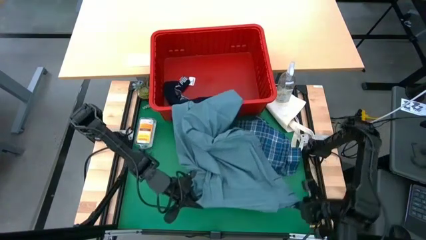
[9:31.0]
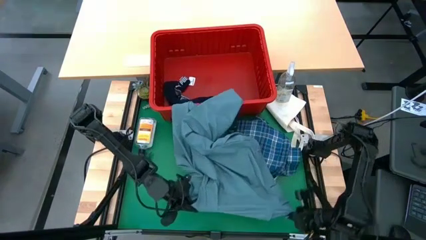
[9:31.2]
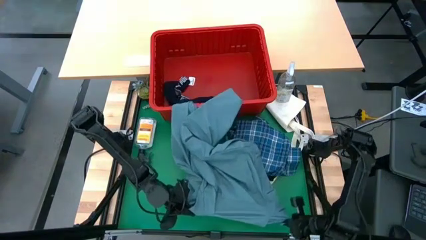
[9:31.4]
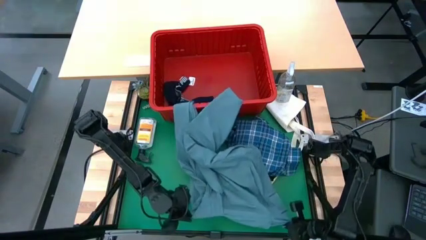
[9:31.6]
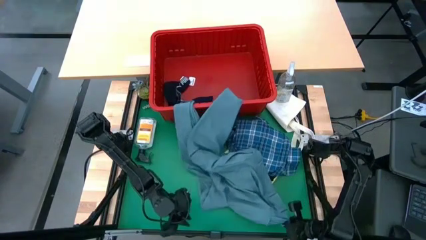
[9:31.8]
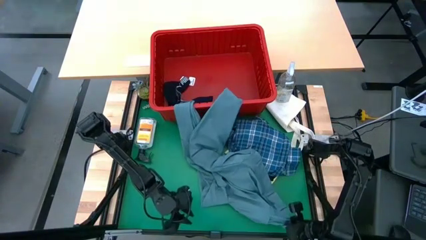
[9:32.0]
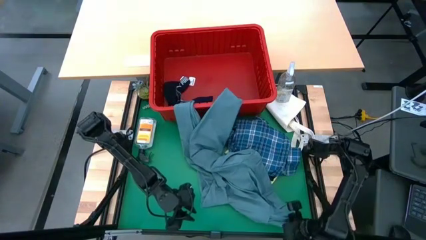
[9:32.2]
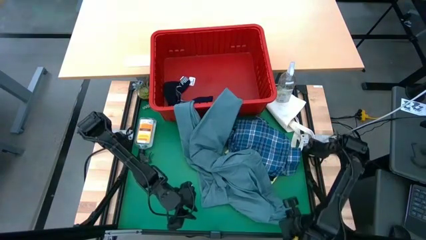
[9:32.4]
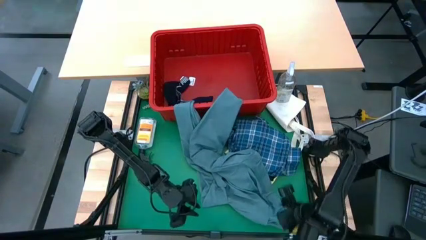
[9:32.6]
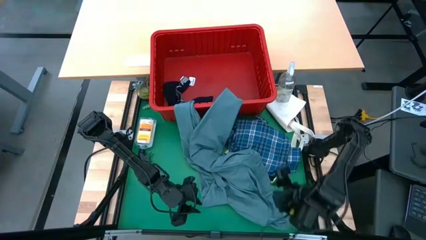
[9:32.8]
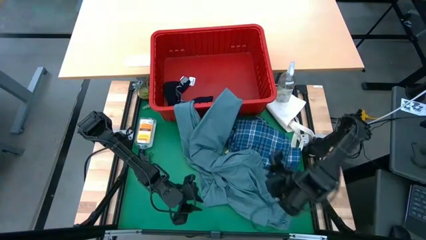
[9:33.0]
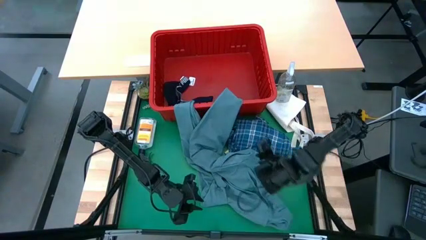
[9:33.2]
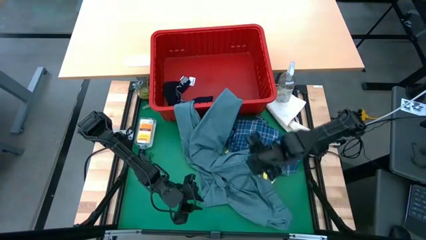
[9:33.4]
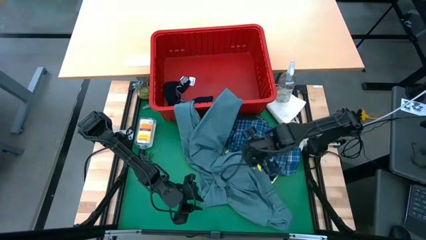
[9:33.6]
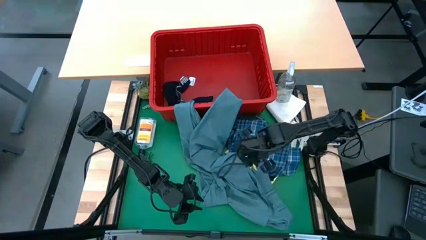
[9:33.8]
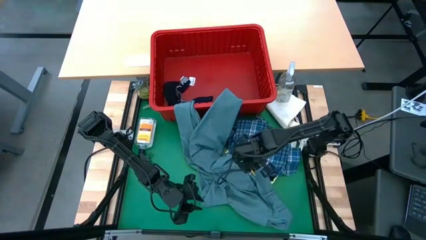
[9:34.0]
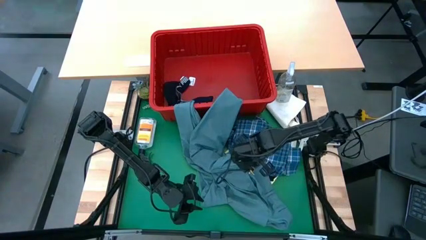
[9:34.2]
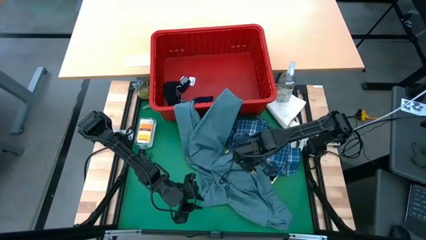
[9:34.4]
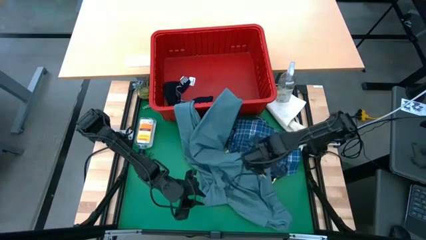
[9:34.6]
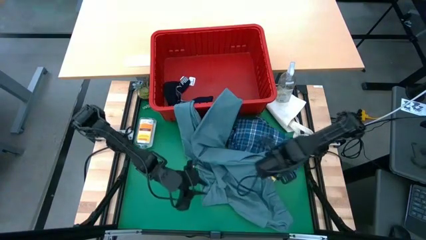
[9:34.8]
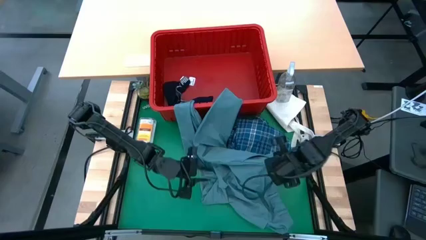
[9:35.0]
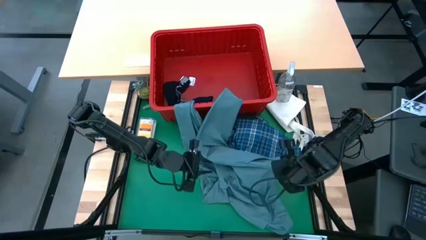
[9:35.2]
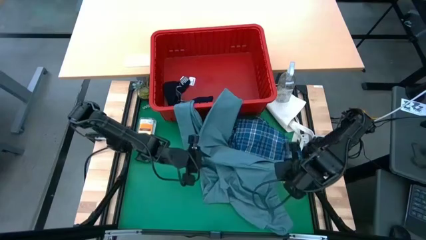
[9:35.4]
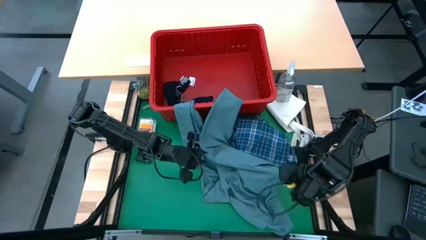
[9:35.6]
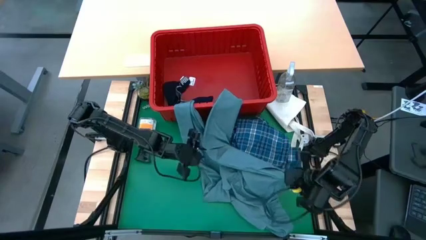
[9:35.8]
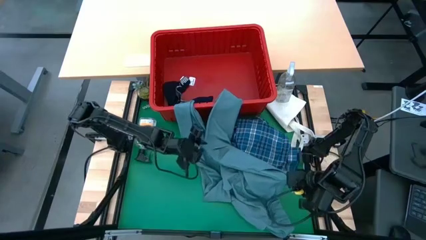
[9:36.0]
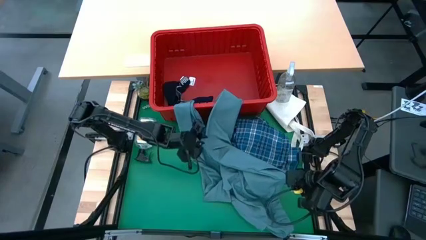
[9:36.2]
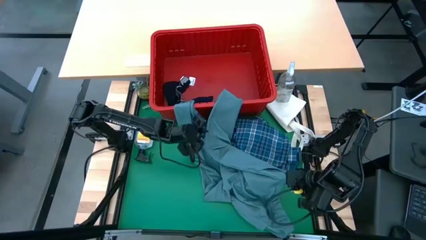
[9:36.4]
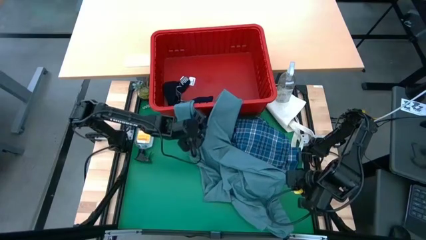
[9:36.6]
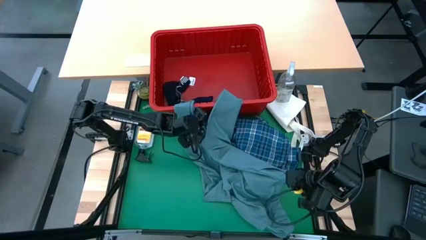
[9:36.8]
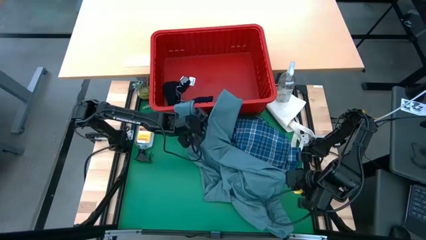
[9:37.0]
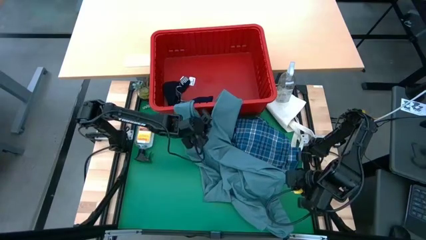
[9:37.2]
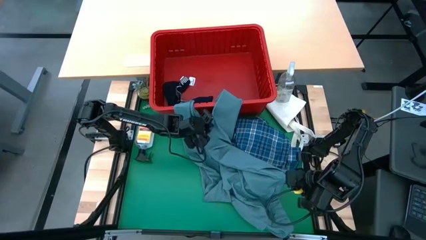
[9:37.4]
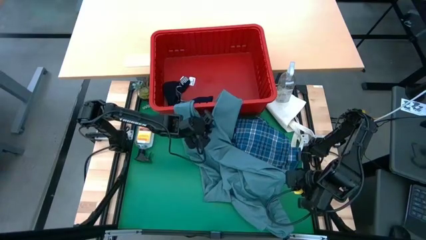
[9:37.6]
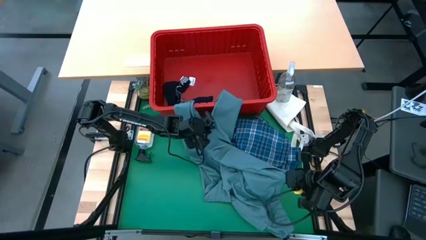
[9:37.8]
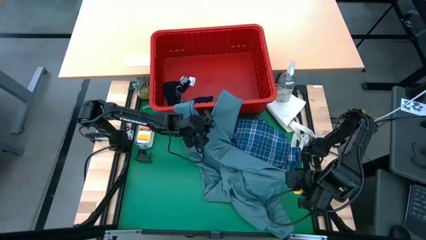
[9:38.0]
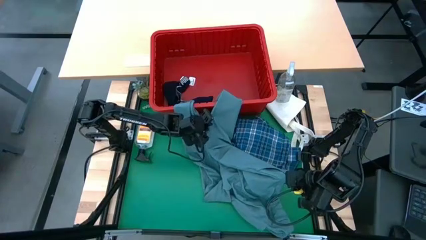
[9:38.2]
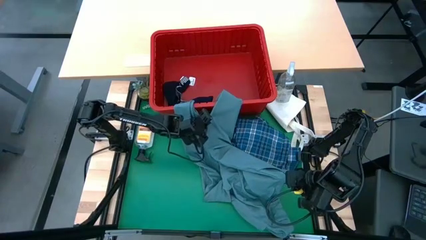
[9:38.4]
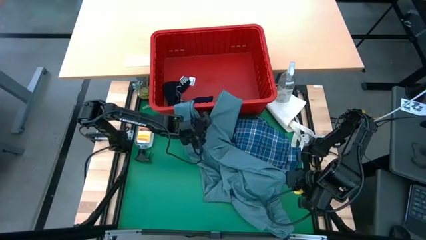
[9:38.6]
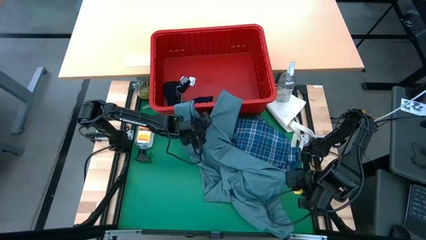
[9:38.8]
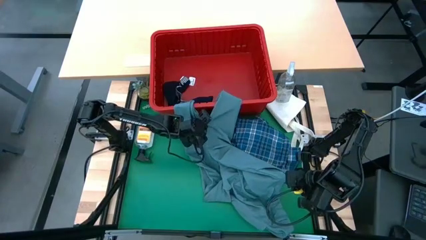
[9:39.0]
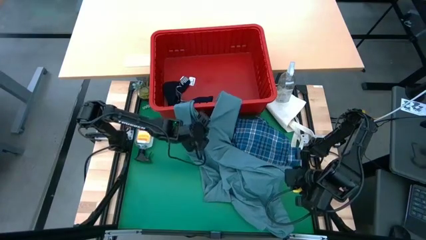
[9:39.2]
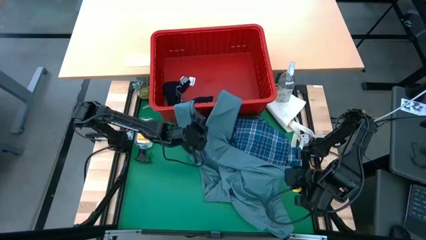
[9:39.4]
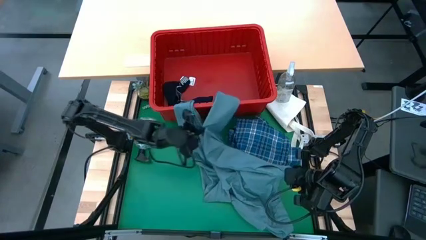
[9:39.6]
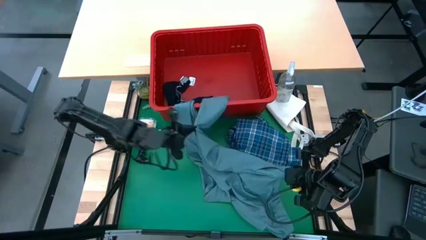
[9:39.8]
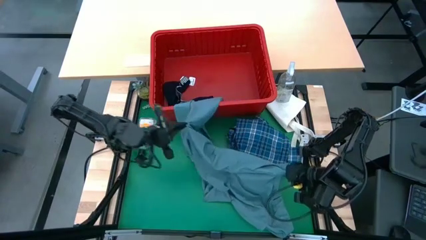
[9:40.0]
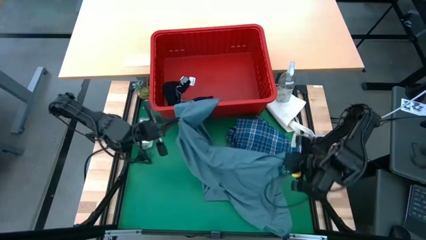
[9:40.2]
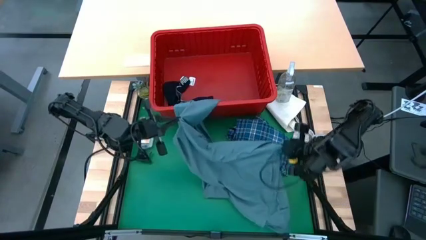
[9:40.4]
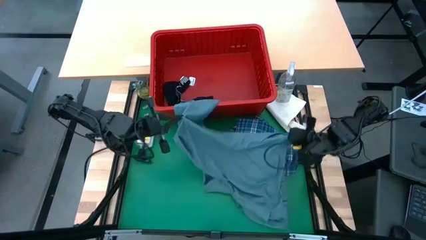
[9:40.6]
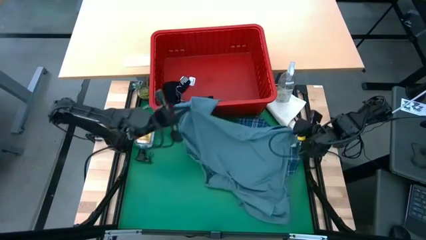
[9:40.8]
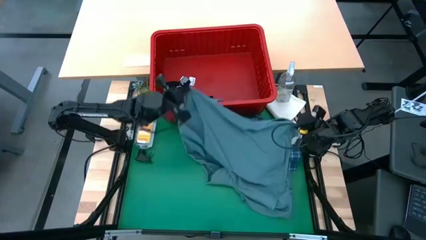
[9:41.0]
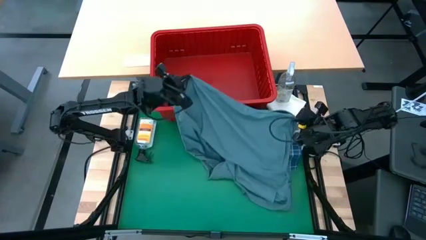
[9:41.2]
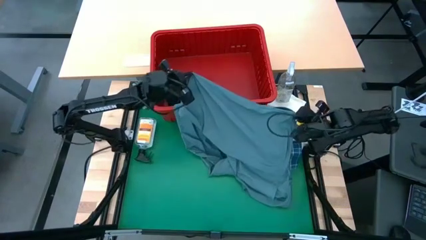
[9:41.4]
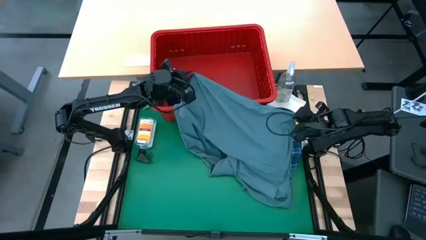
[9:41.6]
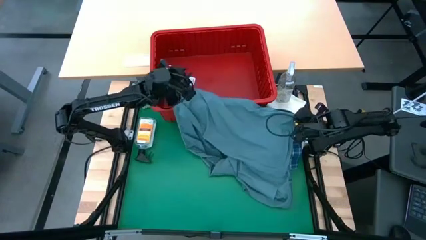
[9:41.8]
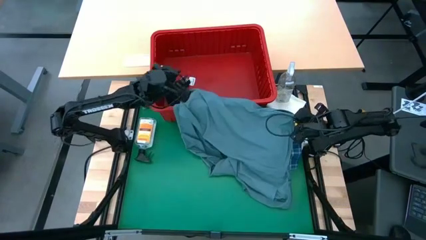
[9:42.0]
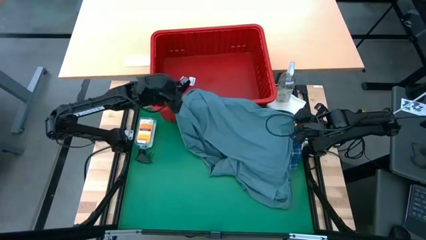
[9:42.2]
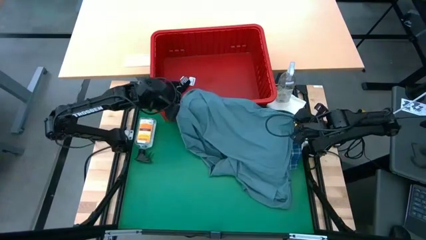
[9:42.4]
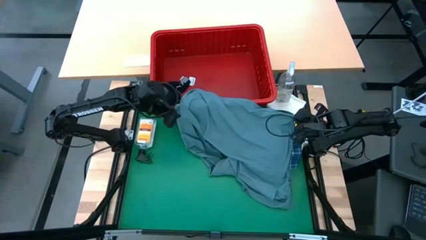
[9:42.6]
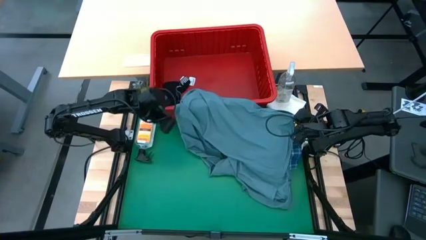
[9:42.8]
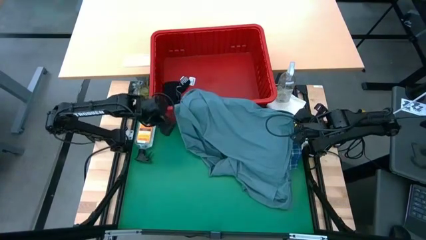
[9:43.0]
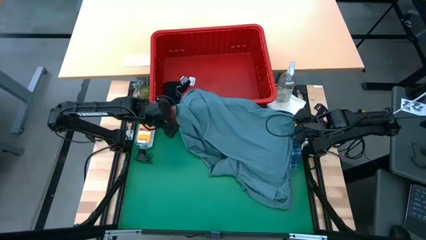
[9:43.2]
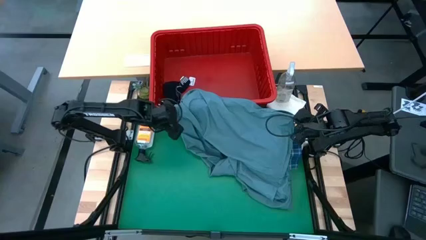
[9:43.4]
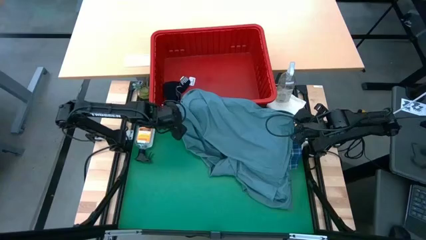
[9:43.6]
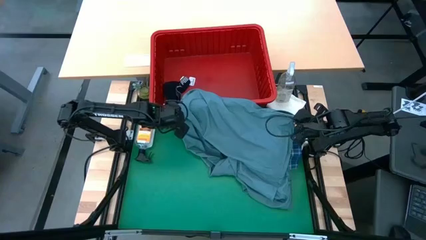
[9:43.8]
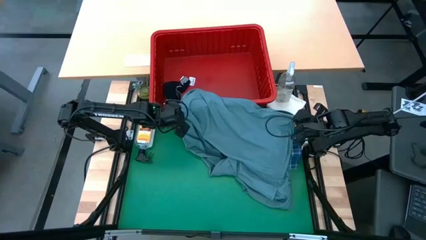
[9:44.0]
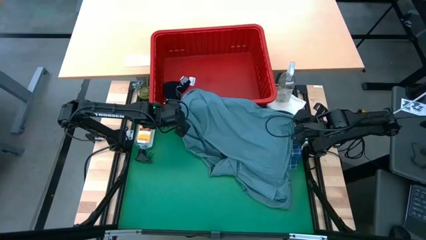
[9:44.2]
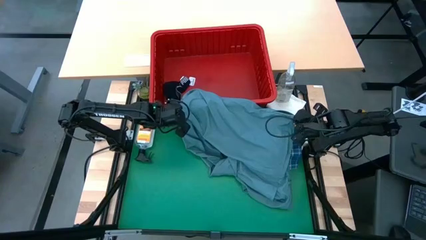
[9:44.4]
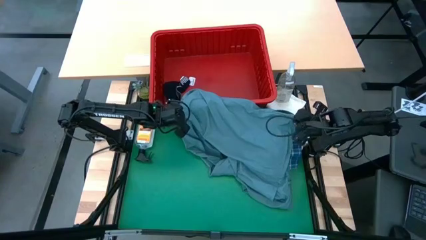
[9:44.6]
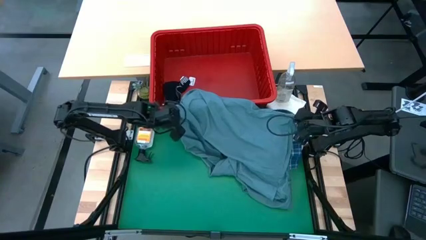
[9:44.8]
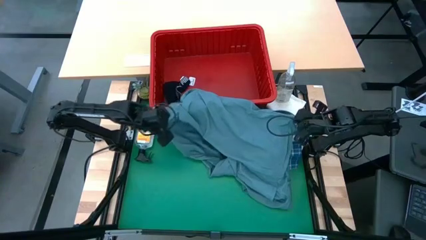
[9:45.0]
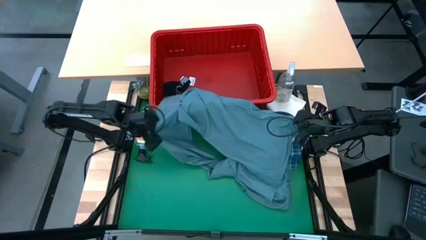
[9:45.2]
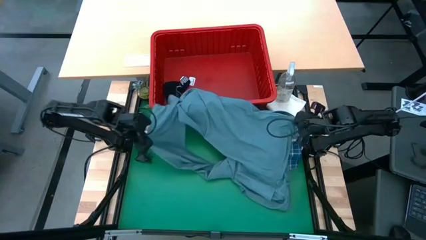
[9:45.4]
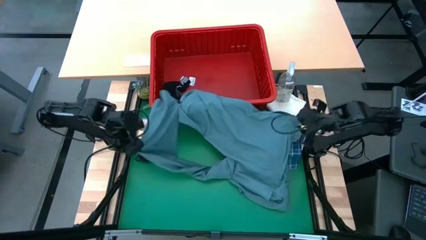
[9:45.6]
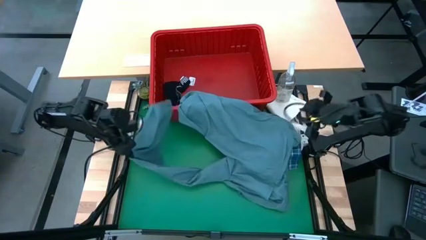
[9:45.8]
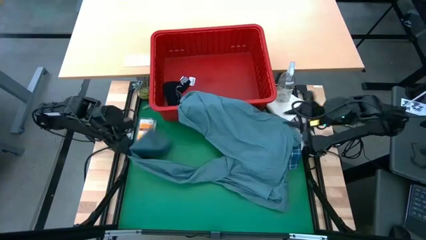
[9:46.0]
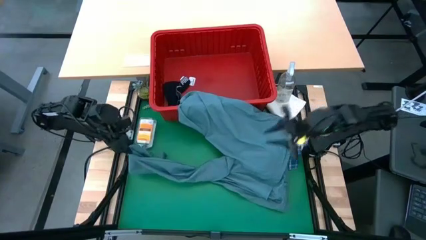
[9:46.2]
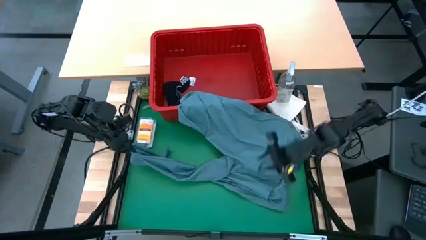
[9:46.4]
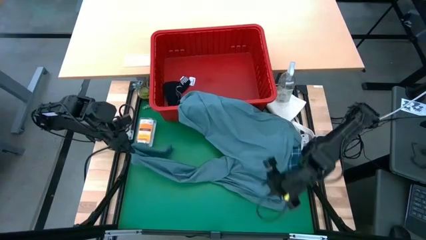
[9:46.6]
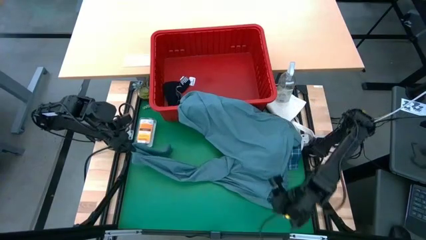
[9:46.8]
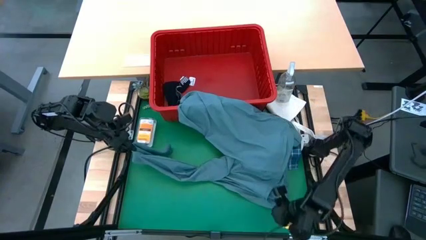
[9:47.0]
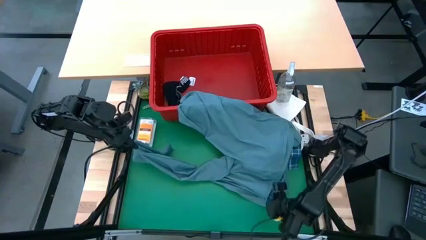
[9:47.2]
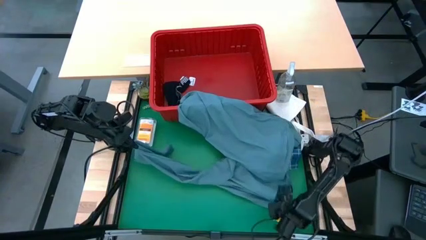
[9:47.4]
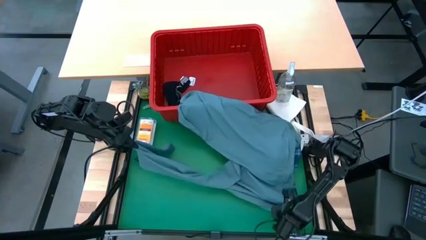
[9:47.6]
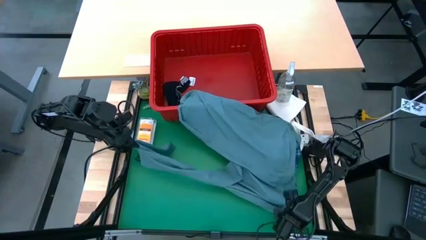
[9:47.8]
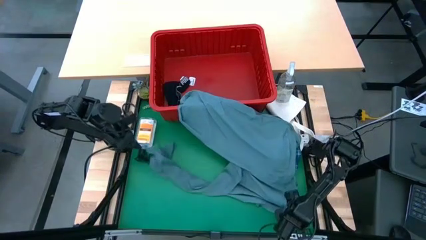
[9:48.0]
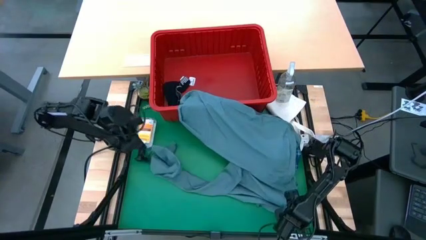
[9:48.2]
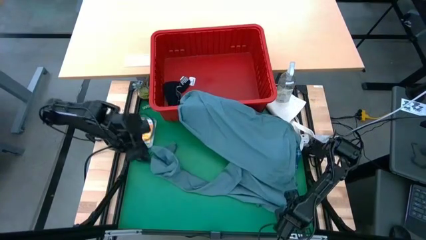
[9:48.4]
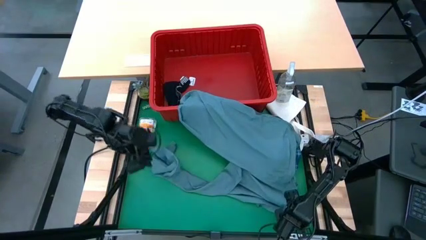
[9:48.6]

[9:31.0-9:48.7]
Task: Fold Laundry from Bin
Fold the blue pants on top of the blue shirt
